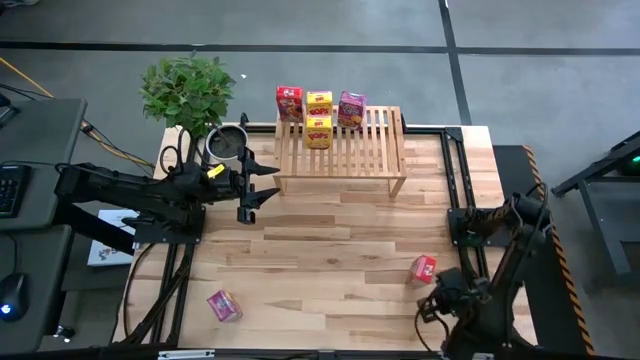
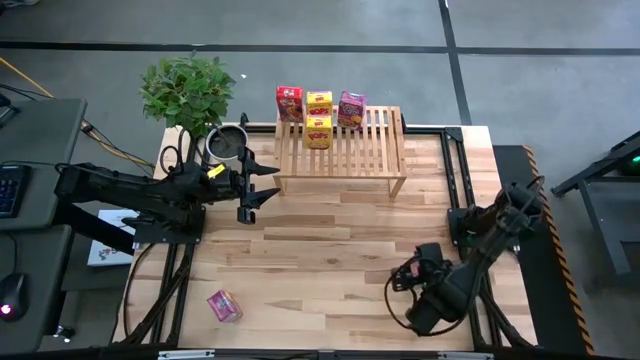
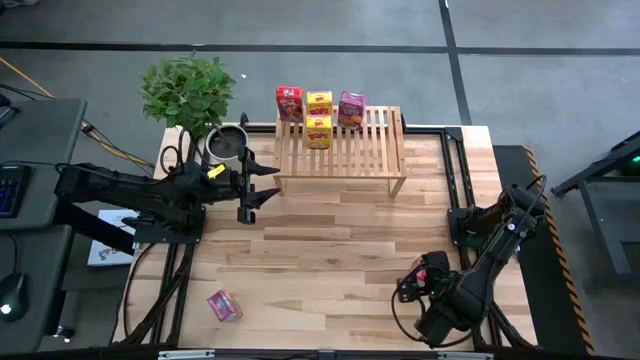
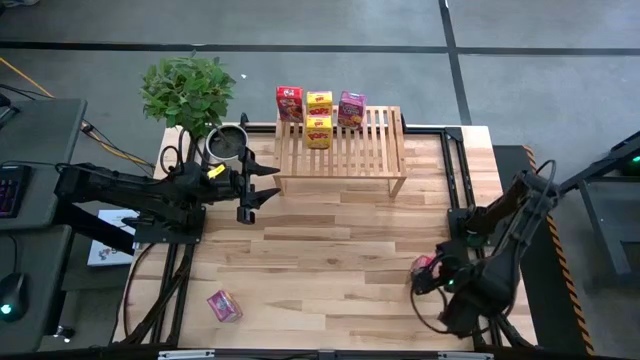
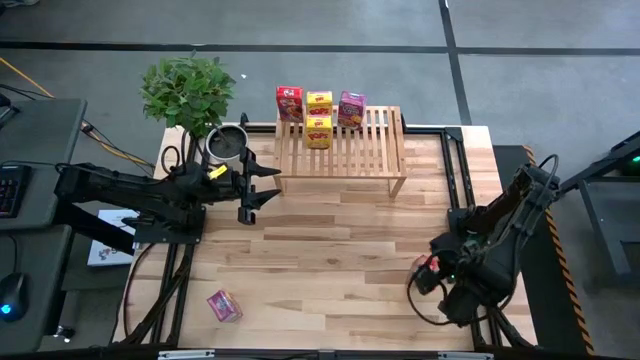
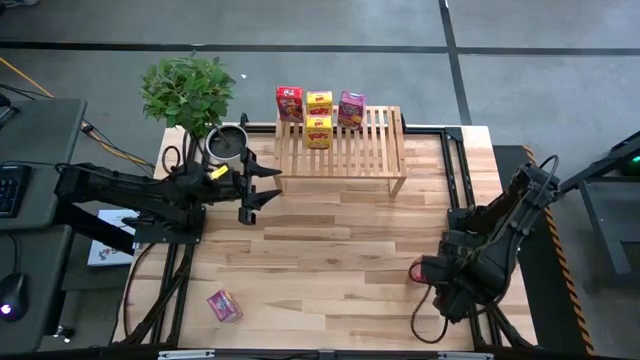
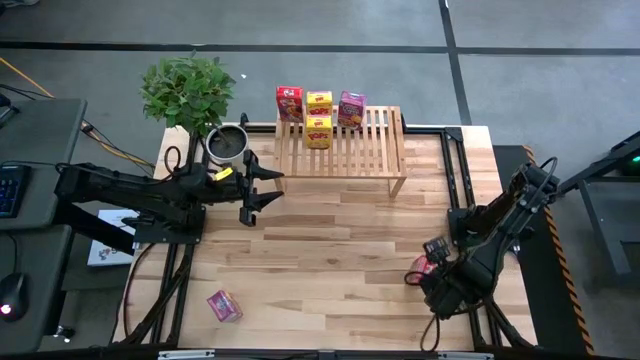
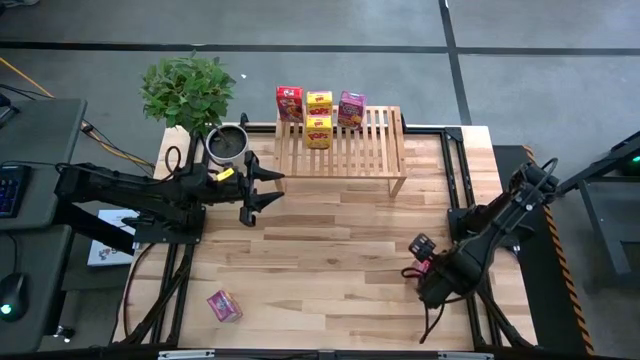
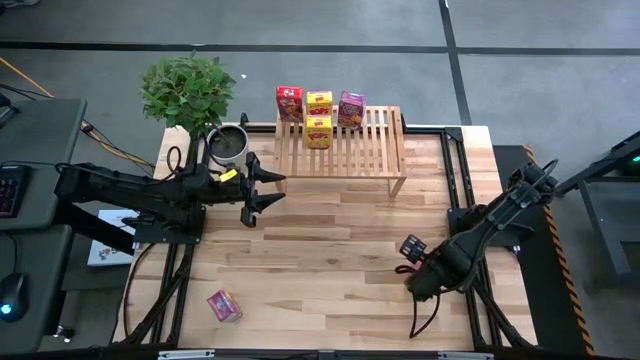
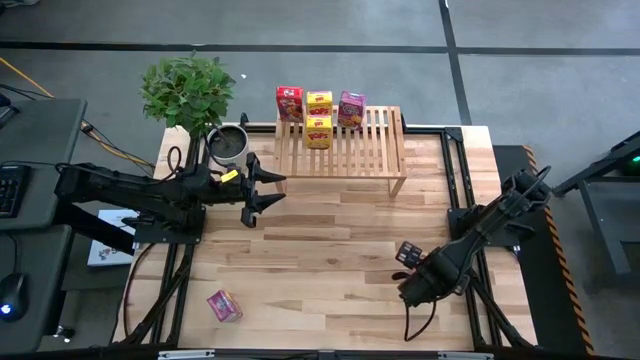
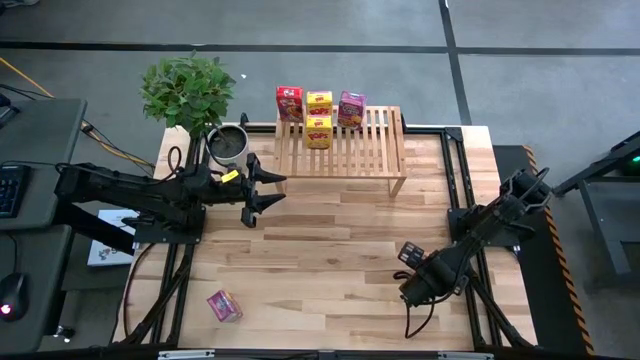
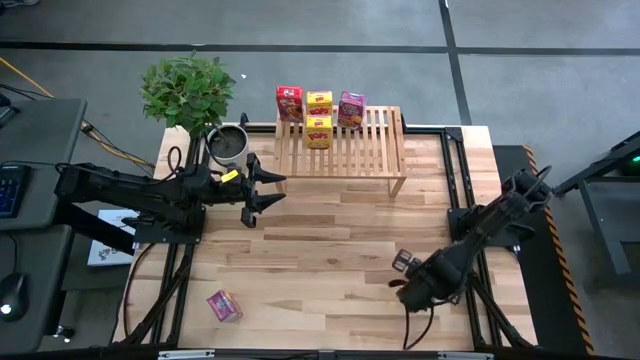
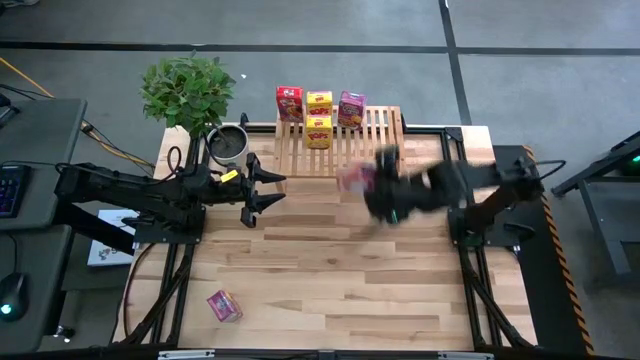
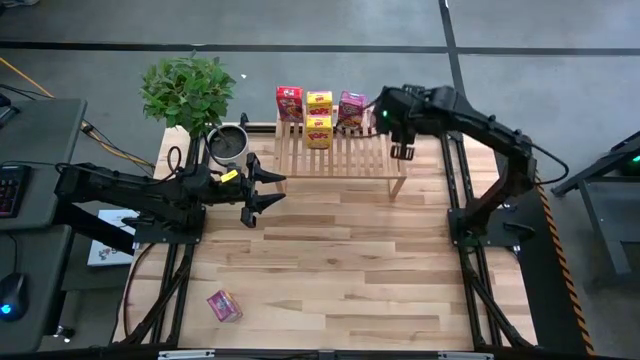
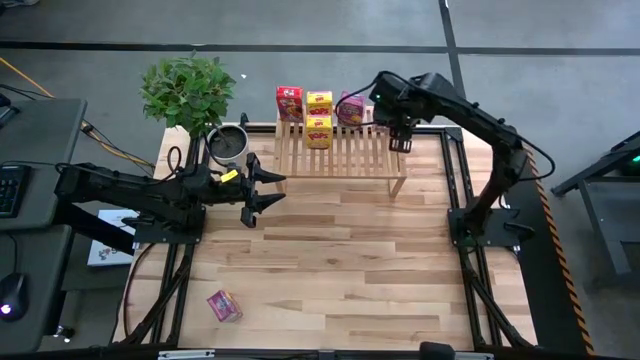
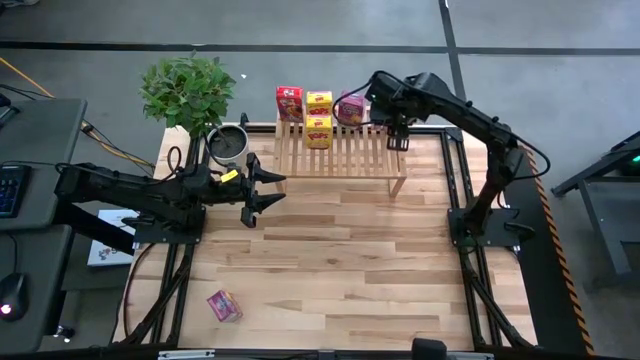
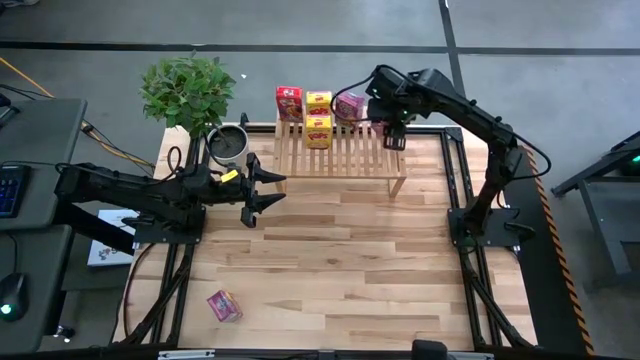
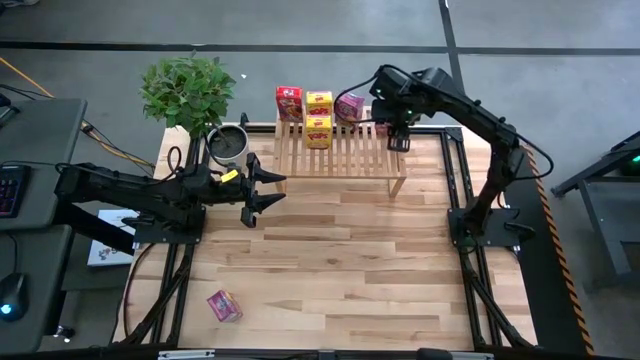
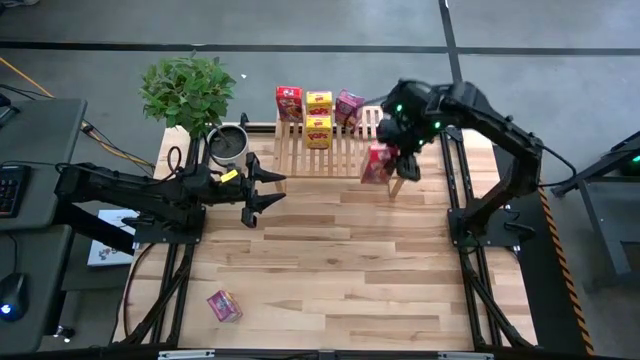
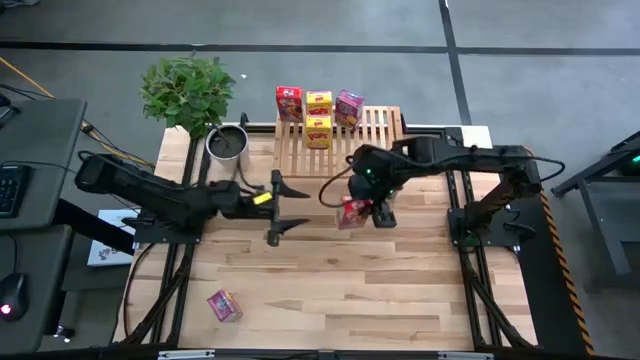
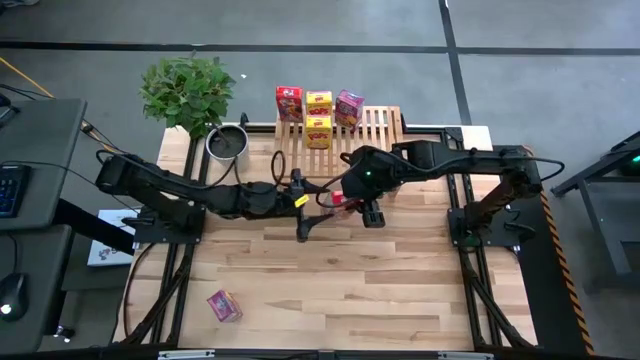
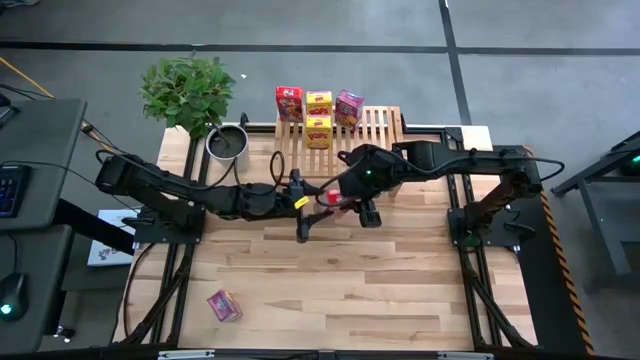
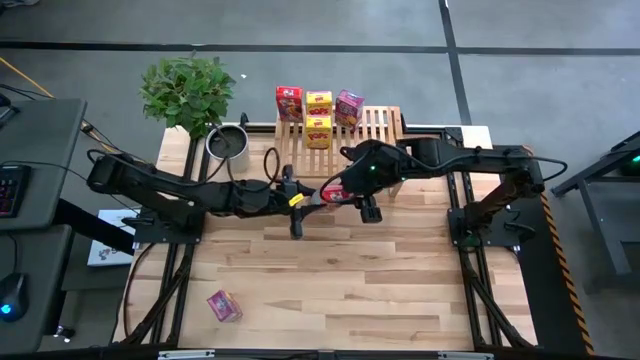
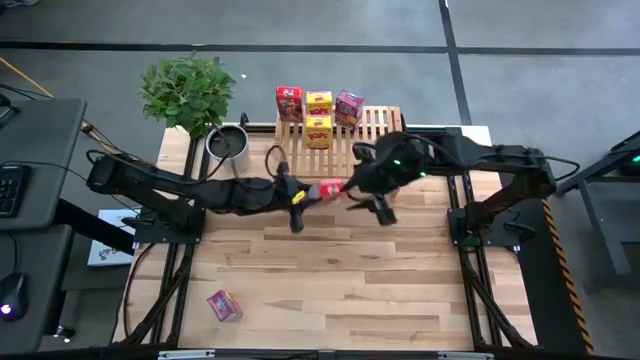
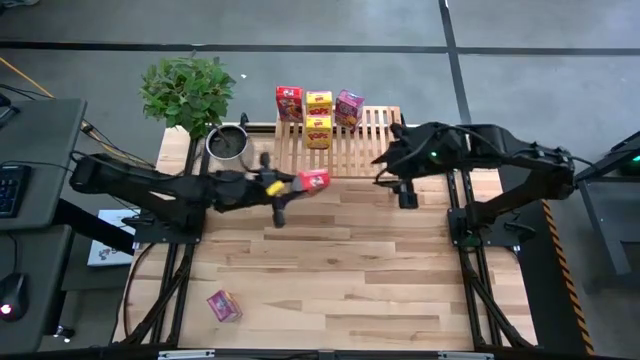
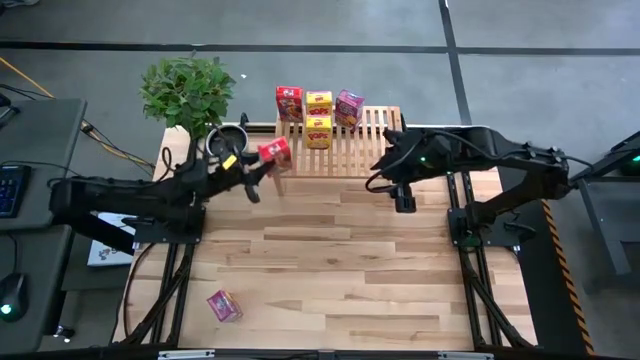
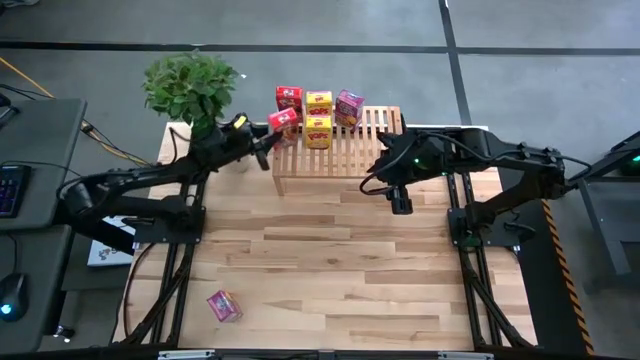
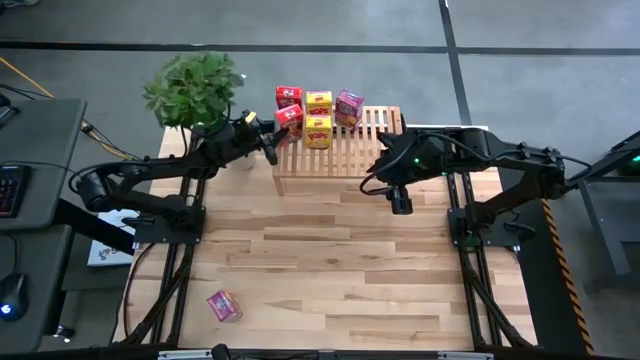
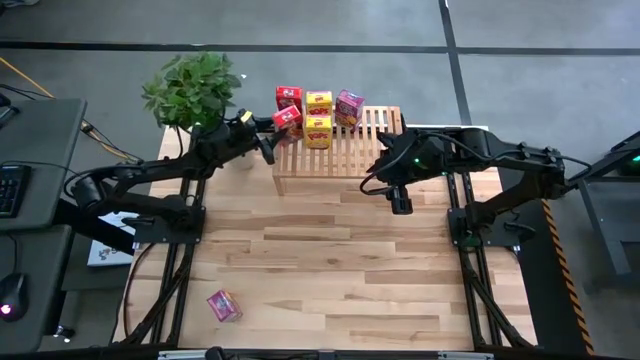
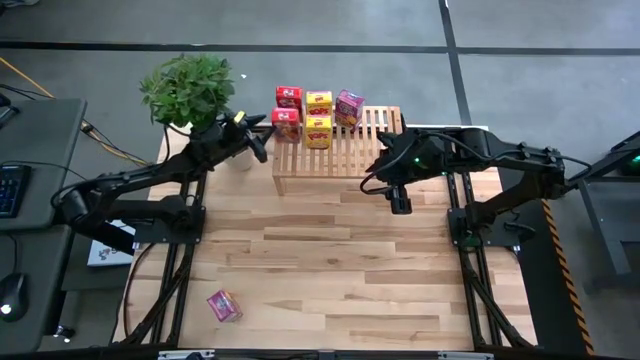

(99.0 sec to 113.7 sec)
Task: Stack cereal on shelf
Align the red cereal box with the other red cereal box on the shelf

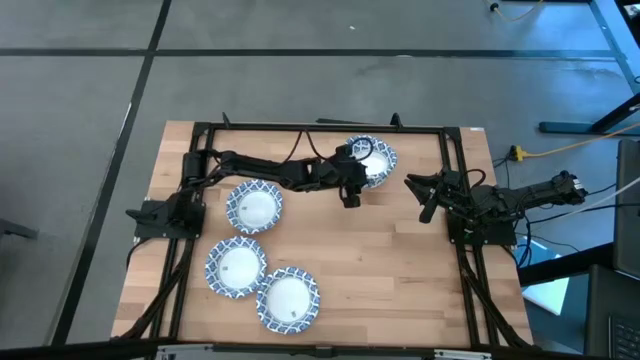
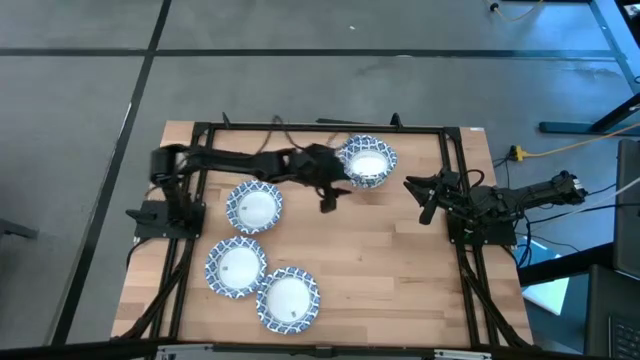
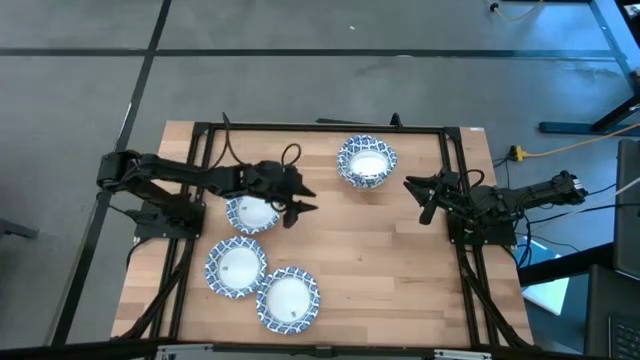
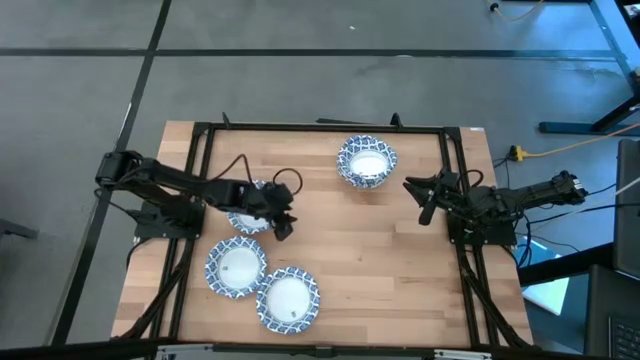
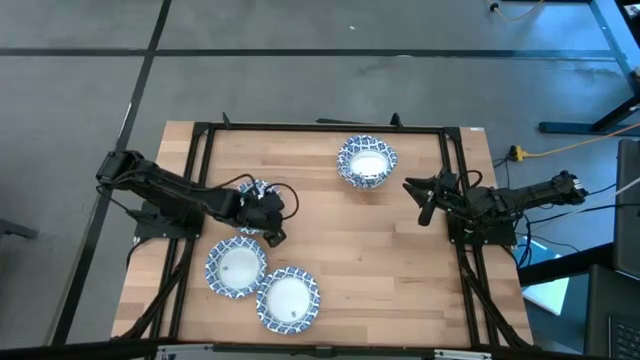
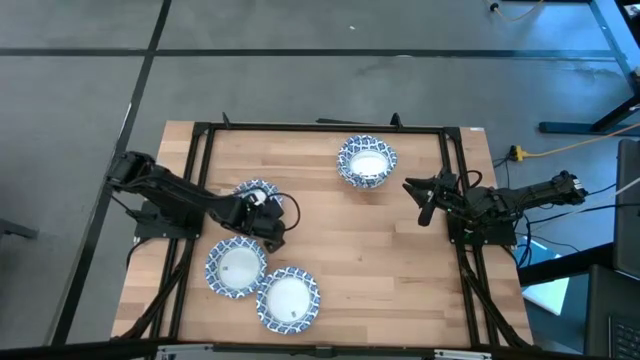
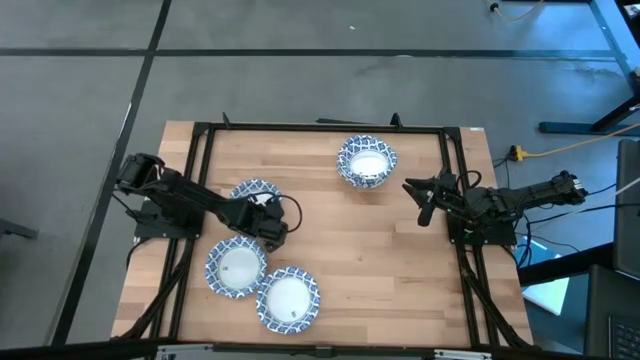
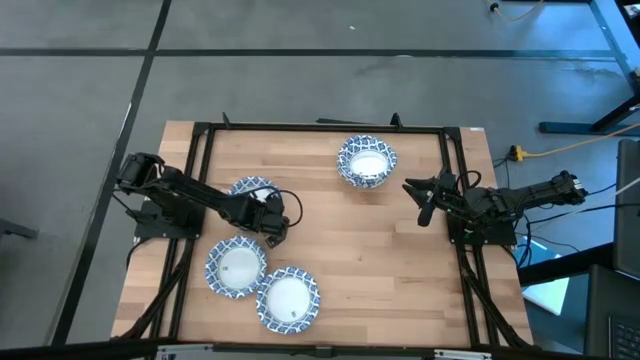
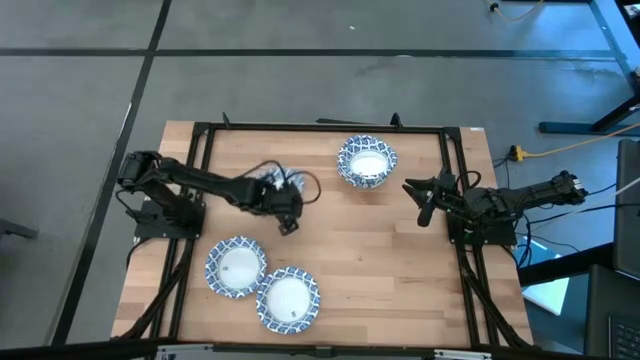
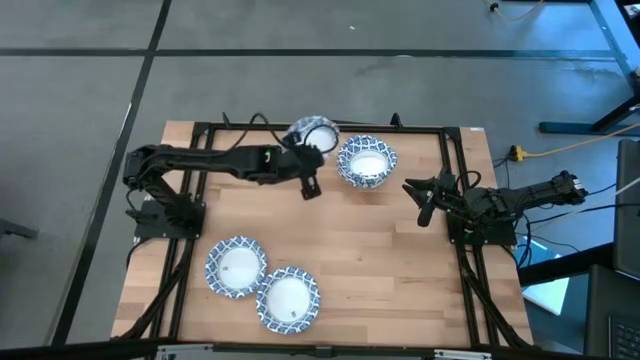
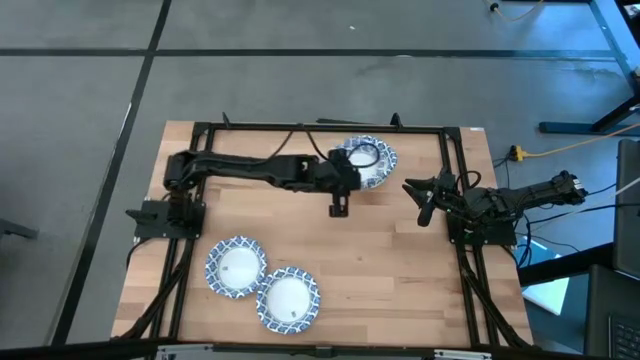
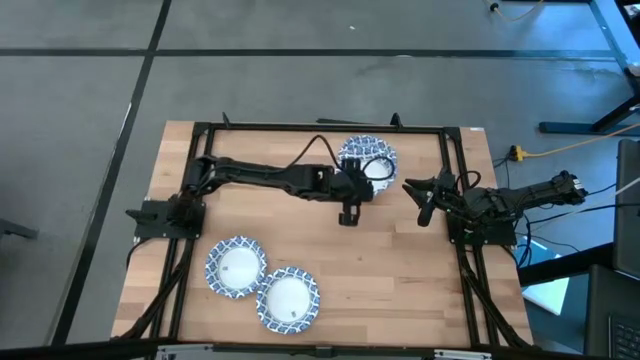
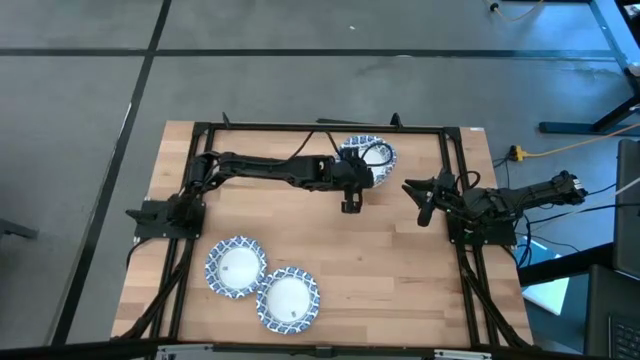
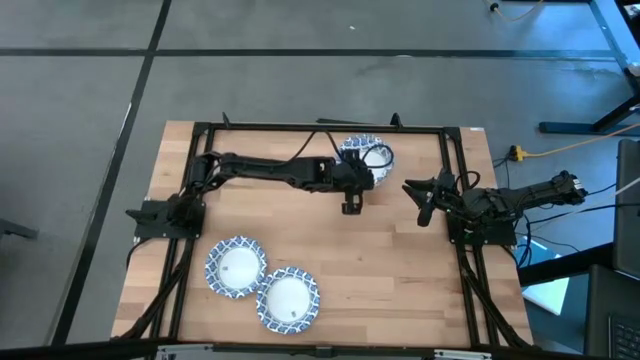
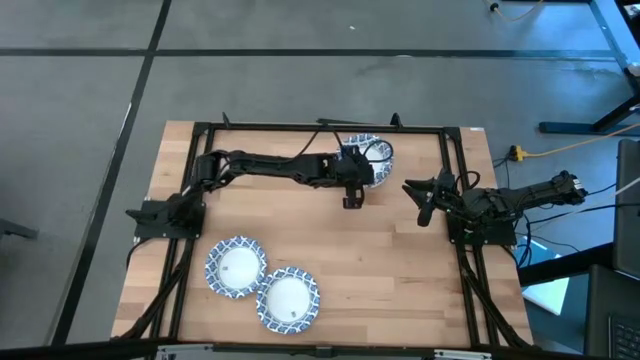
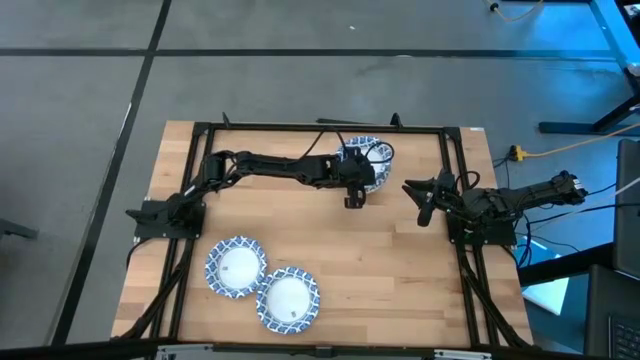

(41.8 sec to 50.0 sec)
Task: Nest bowls inside each other
Stack the white bowl on the white bowl
